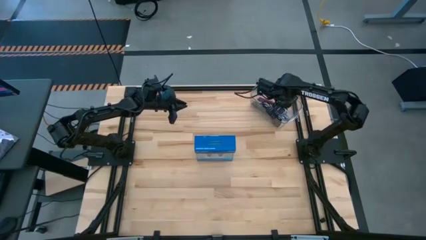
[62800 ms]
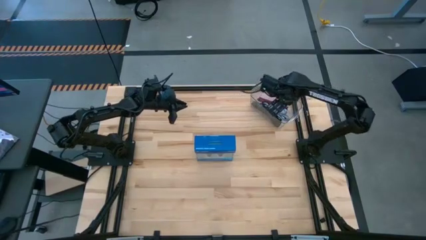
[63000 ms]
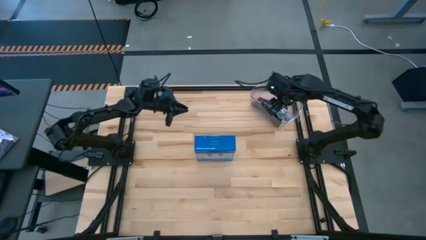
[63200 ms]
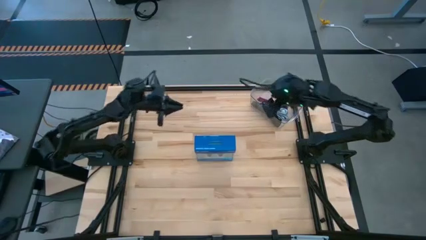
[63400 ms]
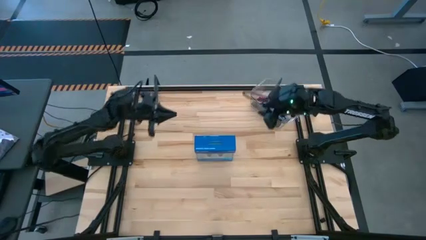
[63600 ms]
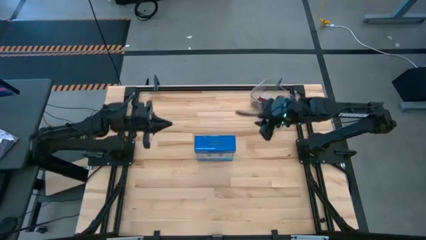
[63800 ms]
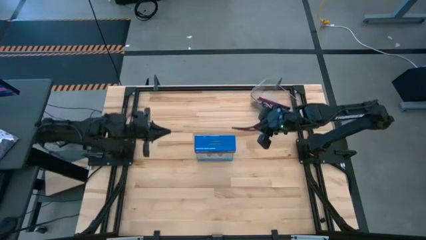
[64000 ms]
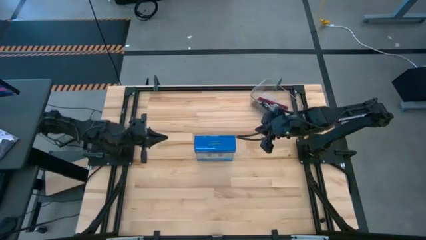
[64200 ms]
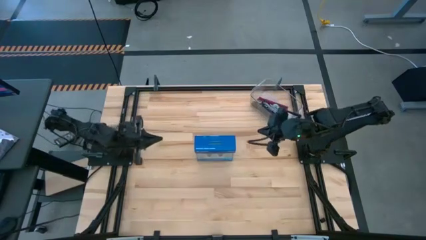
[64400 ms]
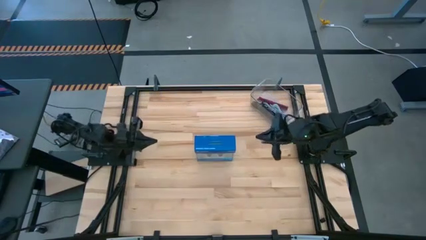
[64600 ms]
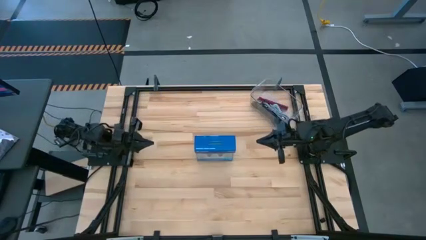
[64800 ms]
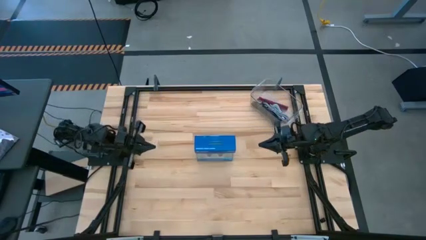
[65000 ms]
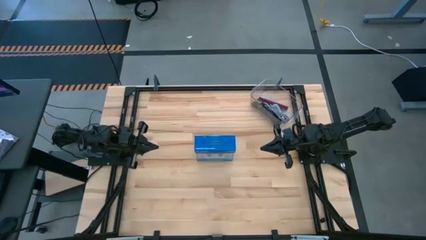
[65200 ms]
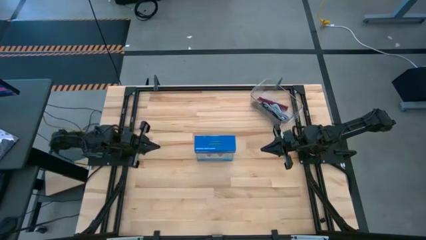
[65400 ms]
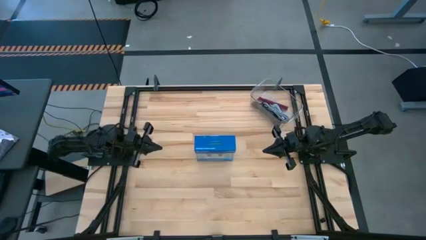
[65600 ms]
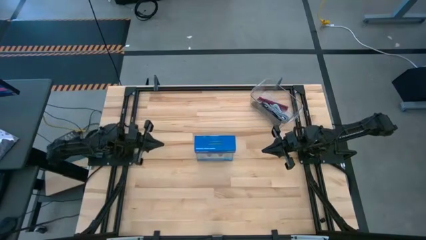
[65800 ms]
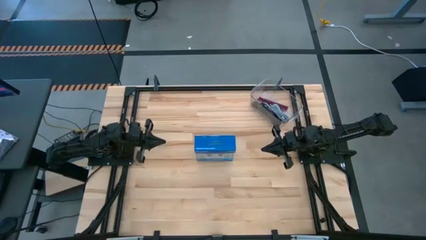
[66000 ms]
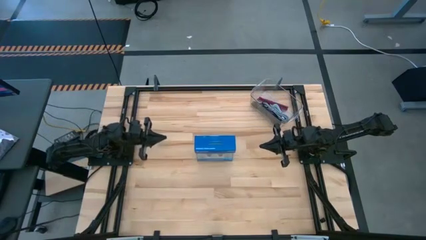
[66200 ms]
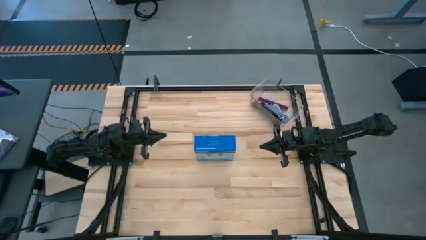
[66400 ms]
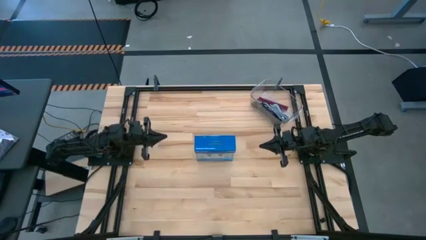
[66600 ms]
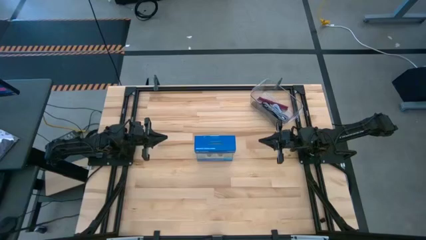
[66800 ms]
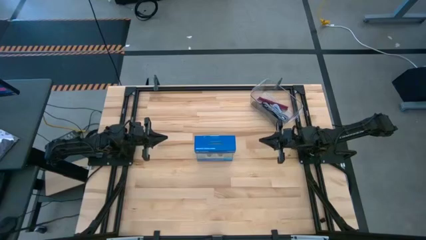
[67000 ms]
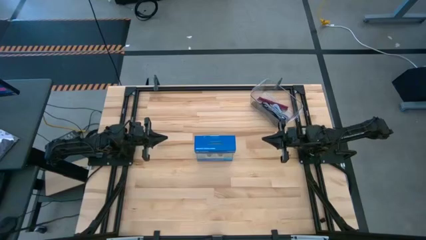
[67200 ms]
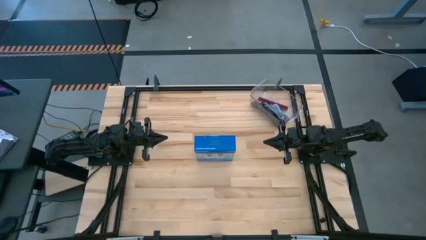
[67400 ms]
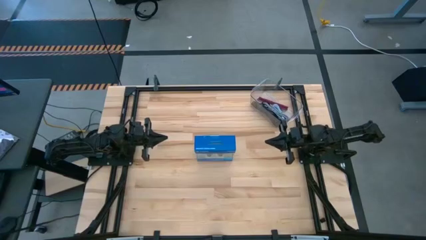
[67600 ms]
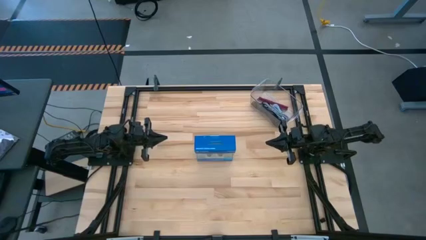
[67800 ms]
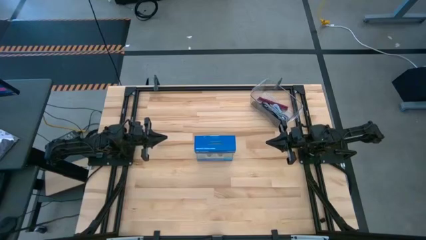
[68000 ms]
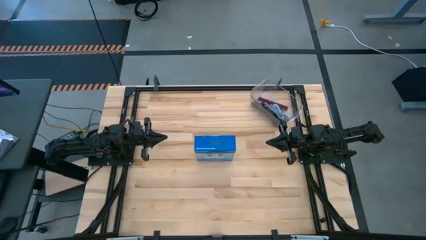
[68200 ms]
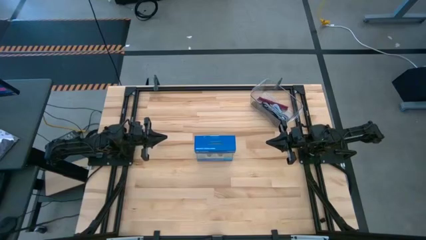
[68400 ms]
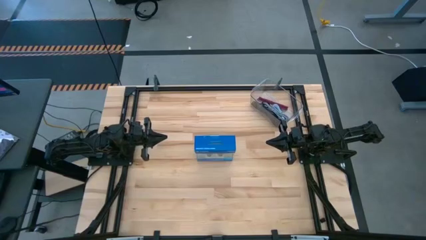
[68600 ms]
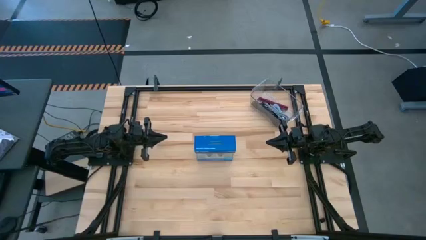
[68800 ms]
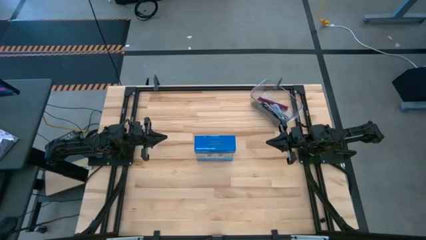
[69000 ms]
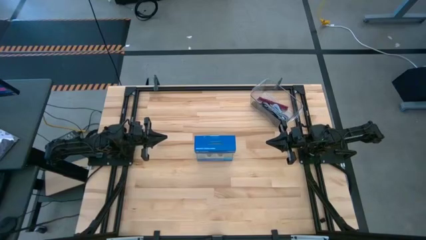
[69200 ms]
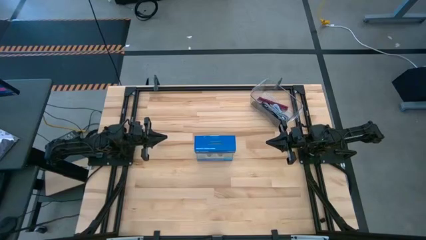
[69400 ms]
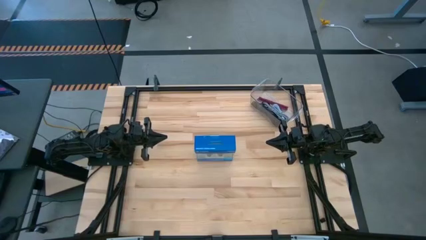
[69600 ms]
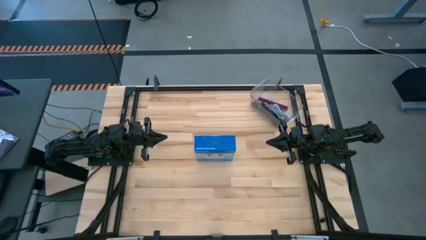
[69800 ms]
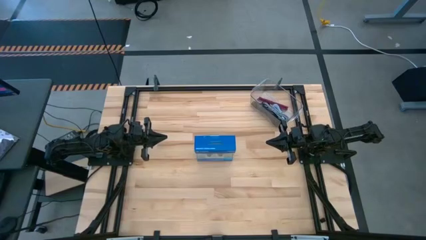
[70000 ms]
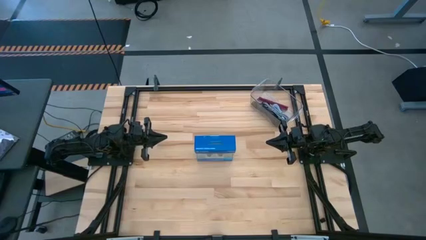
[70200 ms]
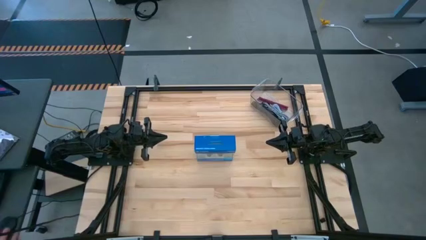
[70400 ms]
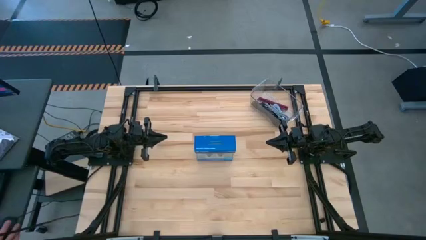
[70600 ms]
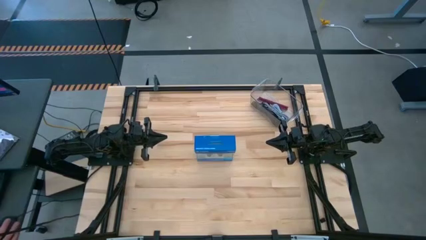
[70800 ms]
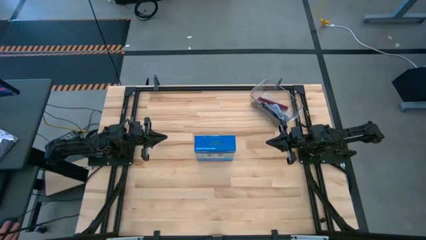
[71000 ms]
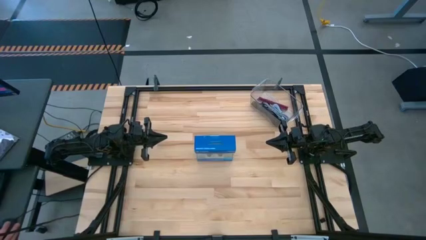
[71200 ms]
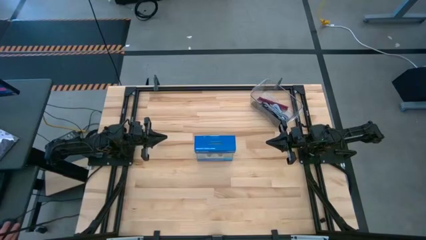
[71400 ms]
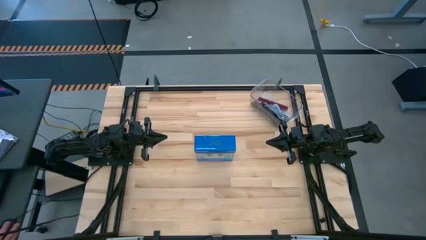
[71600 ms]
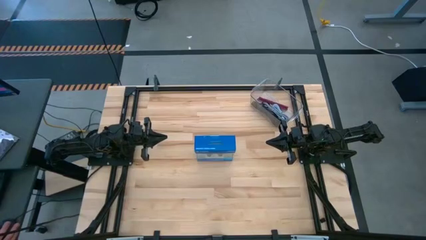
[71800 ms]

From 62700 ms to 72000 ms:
Task: Pick and place USB-C Cables
Return to Home Position

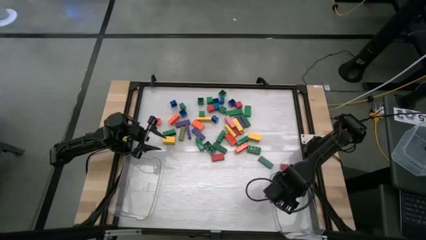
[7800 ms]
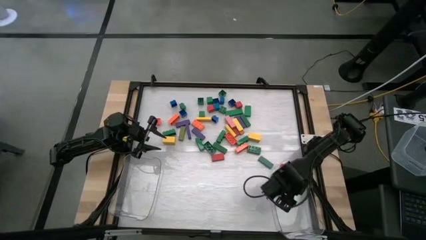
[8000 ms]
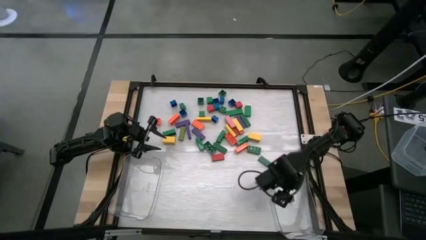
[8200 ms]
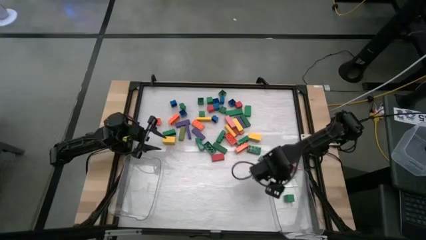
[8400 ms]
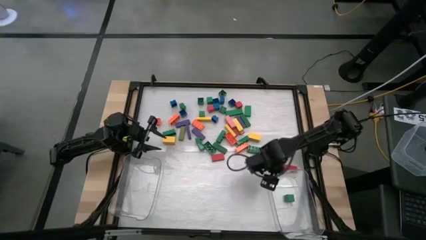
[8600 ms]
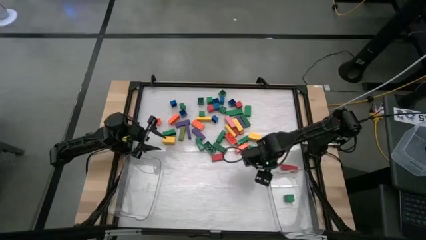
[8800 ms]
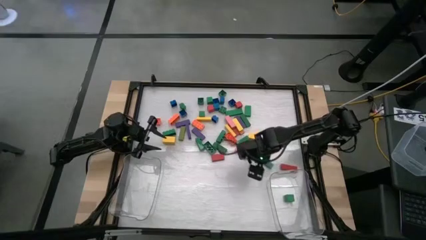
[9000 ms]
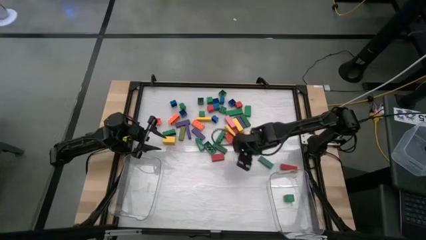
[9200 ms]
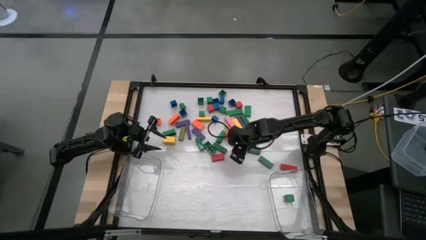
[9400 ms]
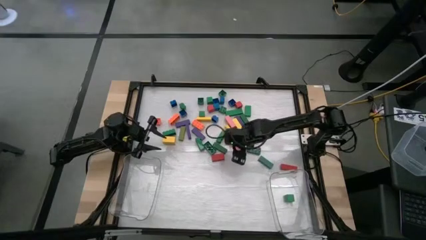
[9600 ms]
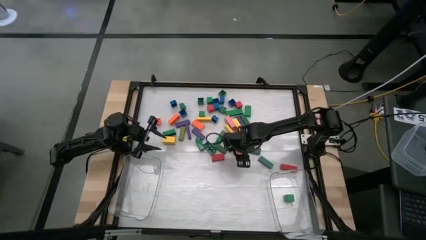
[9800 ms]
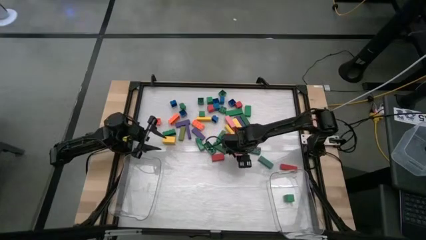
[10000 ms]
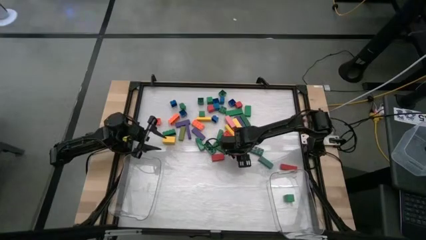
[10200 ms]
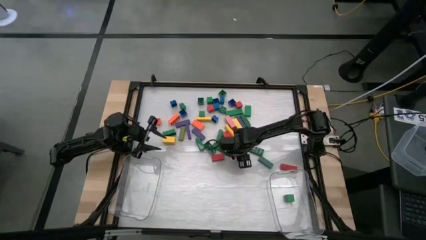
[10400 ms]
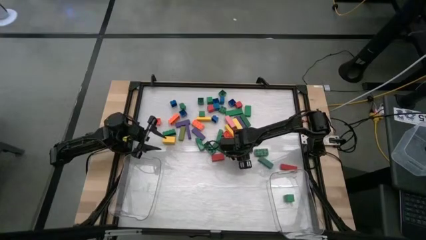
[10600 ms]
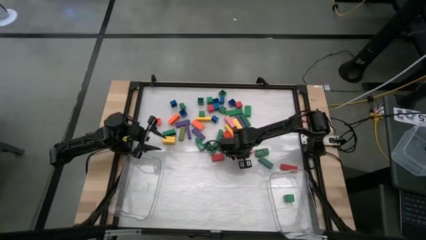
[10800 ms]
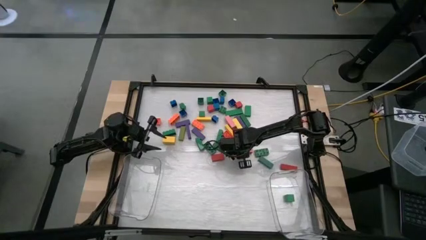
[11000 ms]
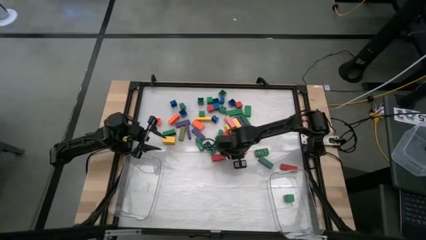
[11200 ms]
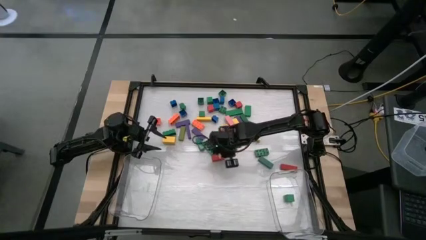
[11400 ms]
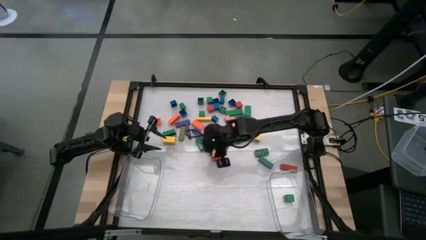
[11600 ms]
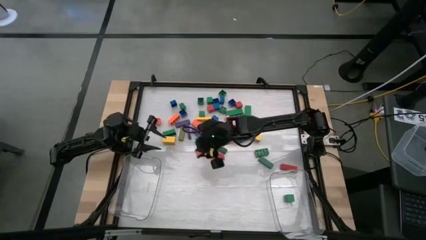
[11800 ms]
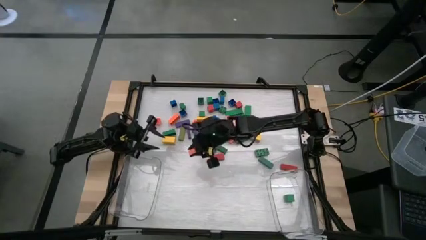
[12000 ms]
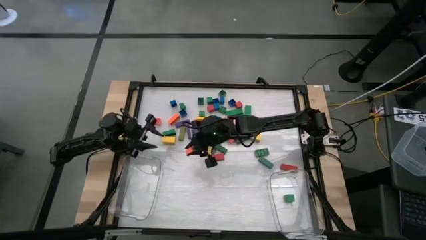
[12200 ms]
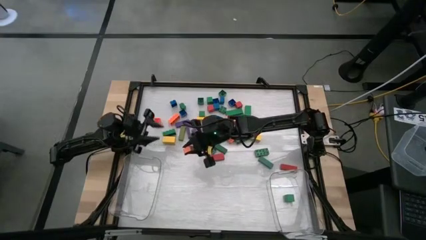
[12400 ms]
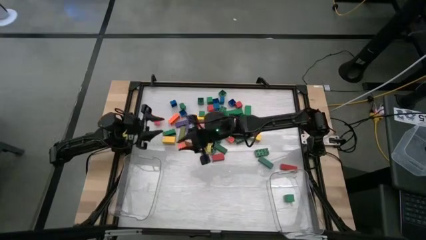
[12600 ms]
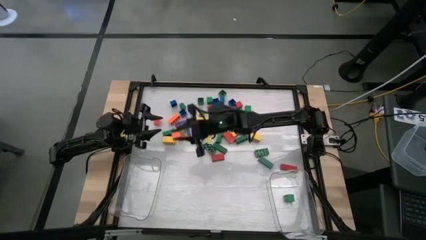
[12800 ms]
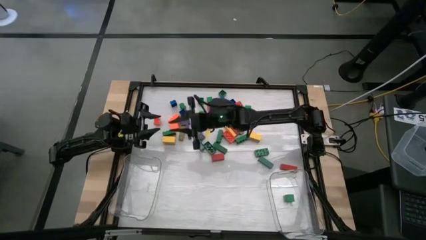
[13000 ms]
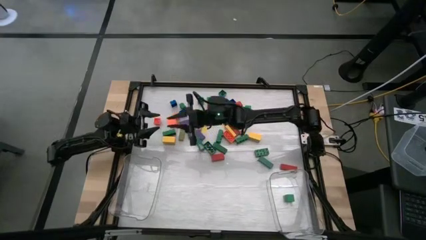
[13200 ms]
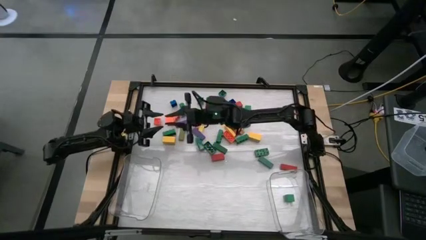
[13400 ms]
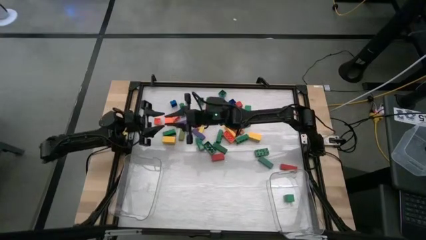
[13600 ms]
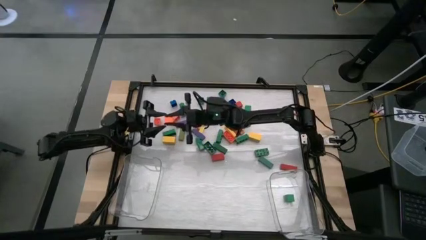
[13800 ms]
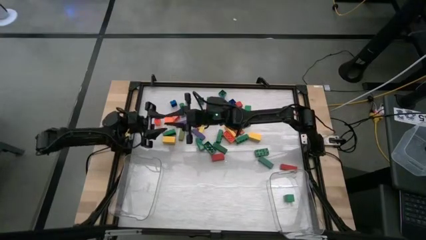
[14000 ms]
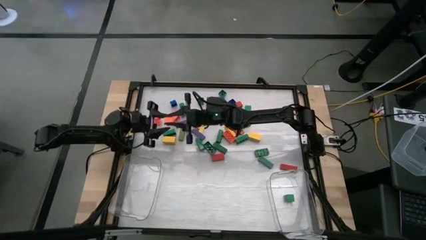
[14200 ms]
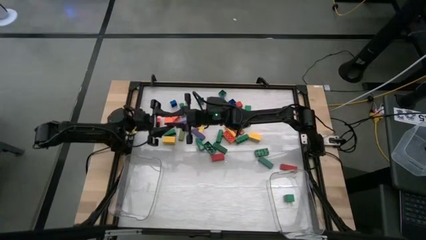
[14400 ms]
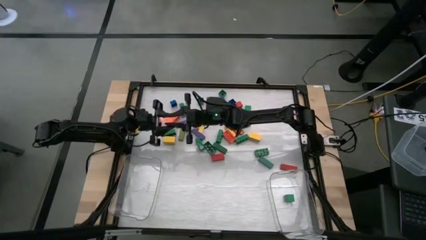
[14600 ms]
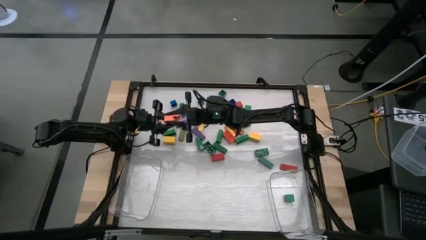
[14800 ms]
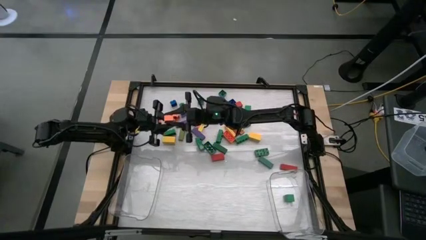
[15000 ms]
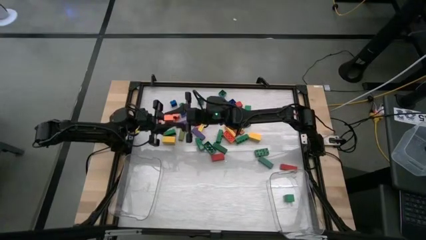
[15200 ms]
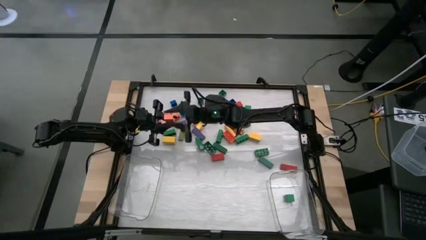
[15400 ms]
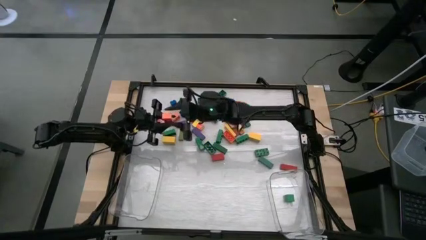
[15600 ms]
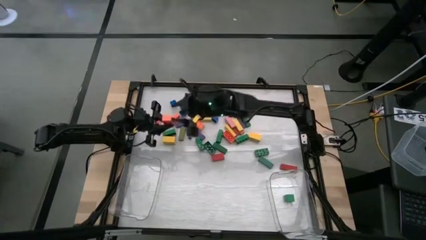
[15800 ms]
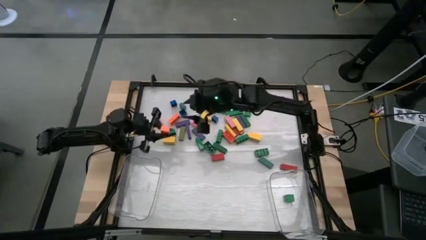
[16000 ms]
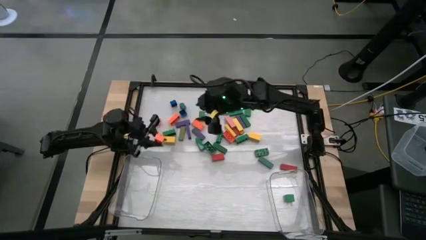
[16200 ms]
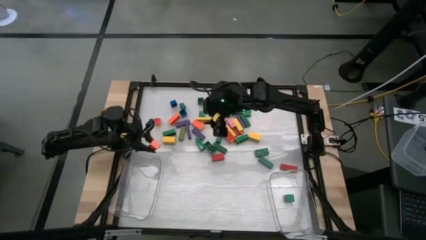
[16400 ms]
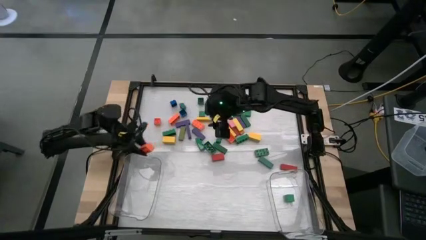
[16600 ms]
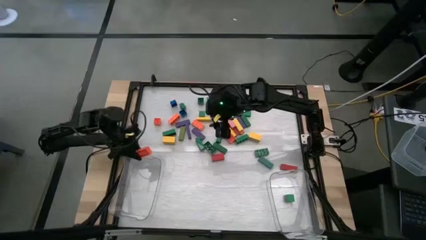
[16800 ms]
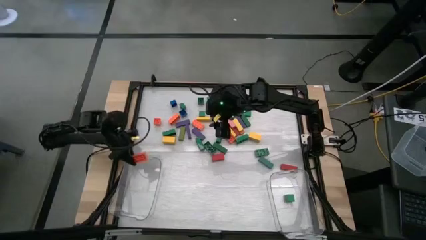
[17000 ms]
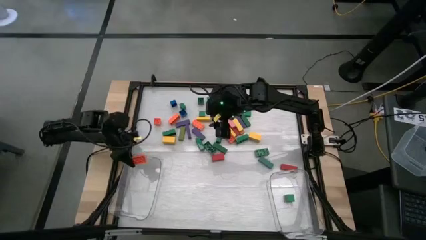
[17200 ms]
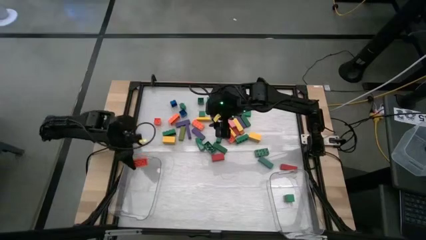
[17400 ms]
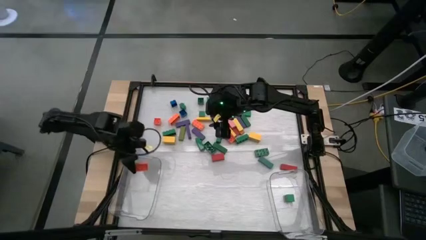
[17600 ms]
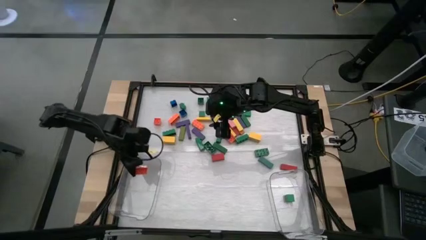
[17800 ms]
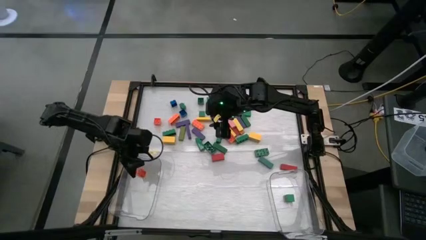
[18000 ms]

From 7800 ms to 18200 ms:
Task: Sort blocks by size
Put the large orange game piece into the left transparent bin
